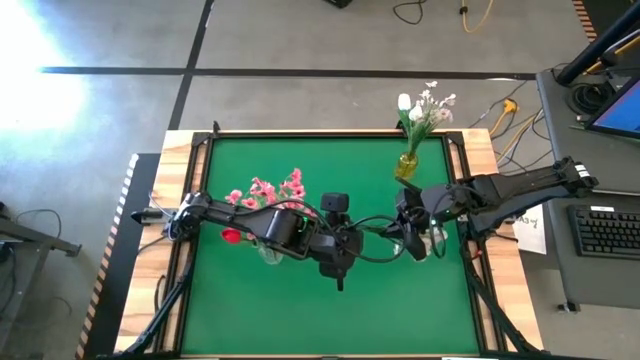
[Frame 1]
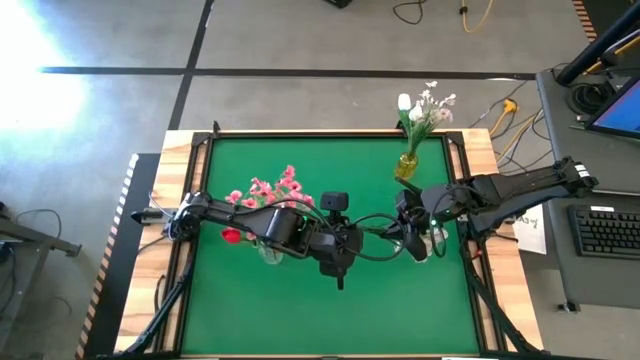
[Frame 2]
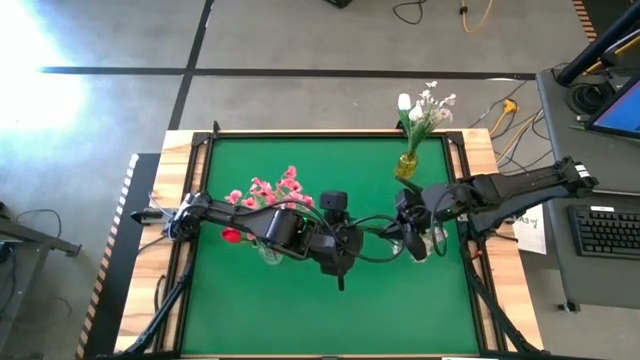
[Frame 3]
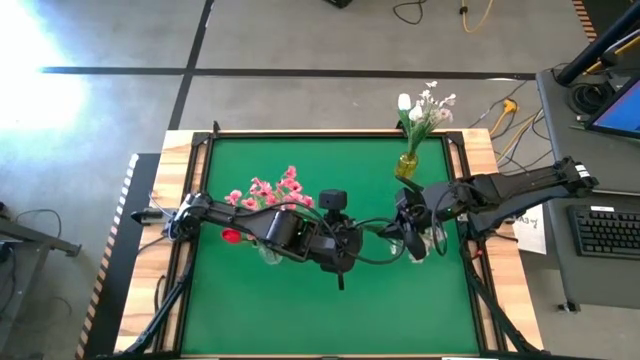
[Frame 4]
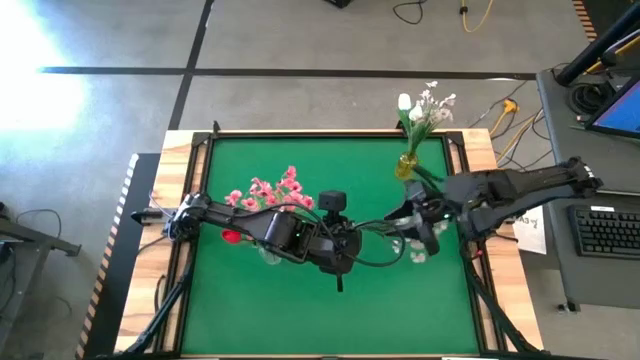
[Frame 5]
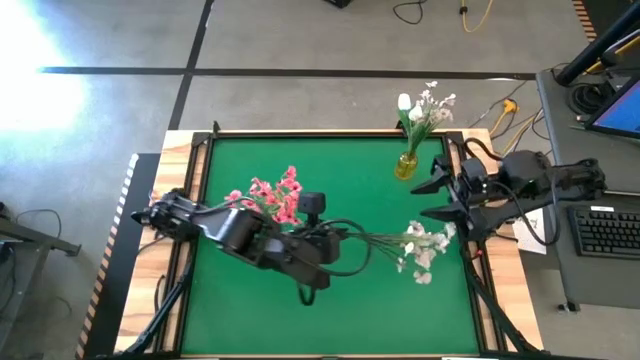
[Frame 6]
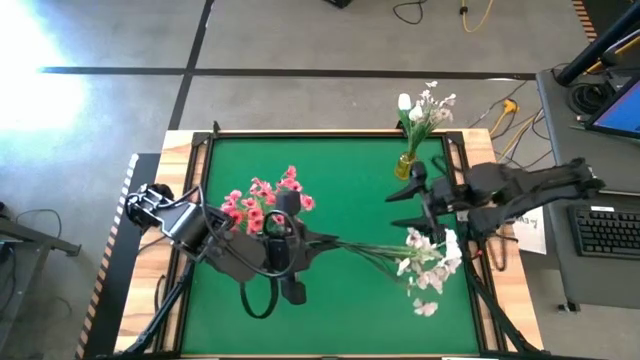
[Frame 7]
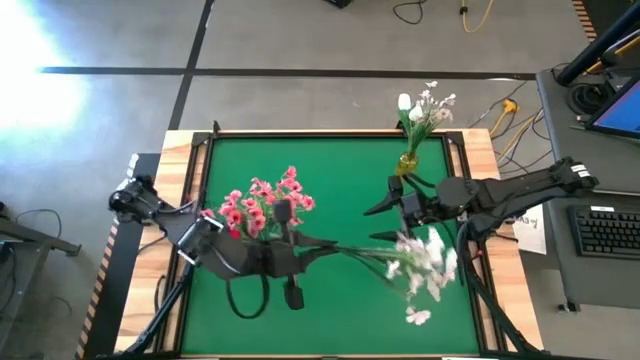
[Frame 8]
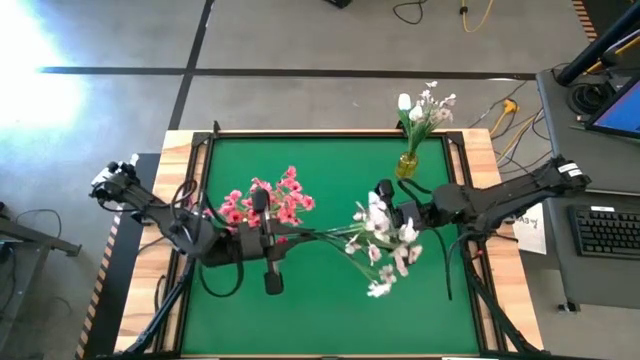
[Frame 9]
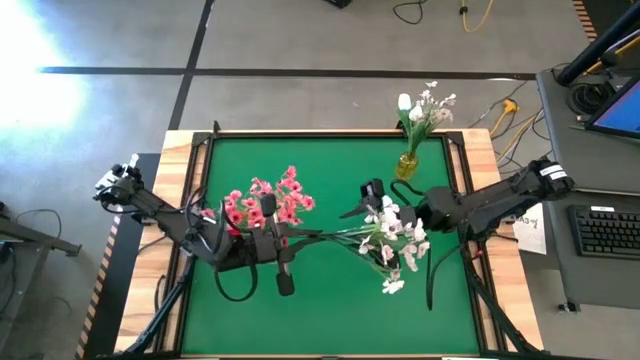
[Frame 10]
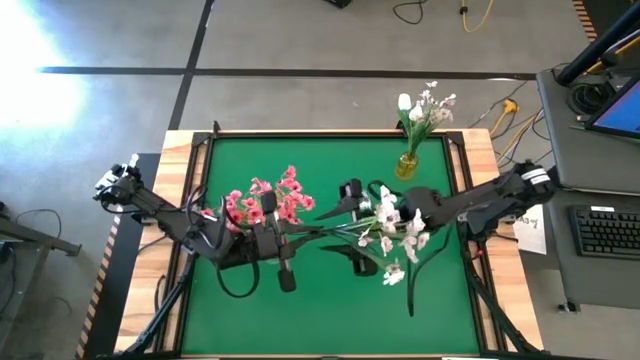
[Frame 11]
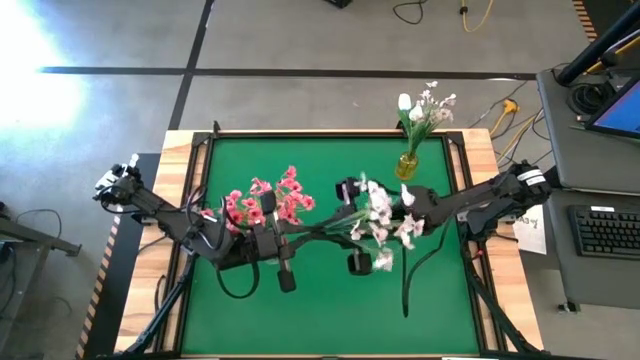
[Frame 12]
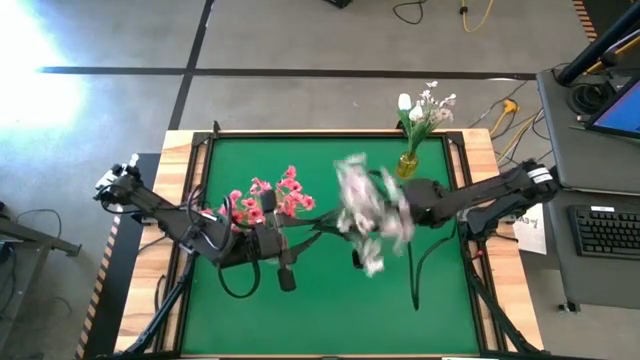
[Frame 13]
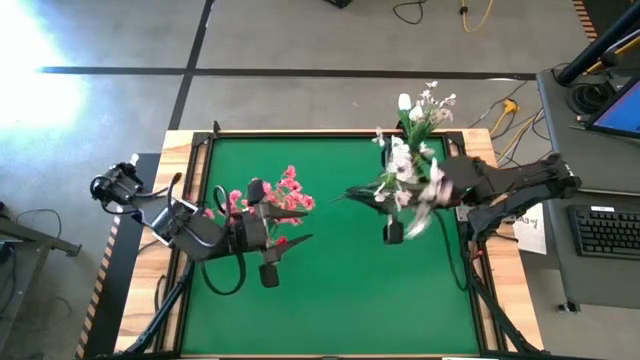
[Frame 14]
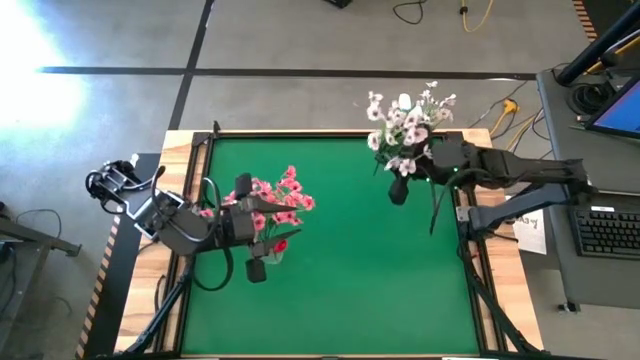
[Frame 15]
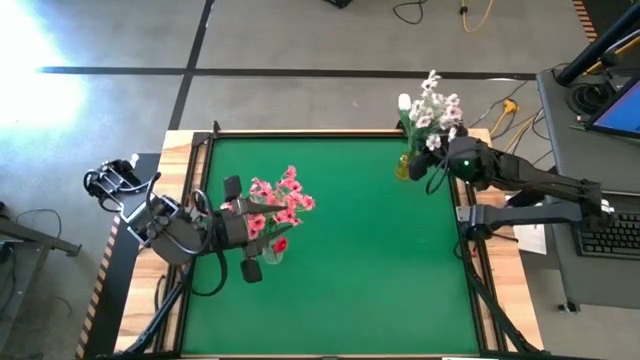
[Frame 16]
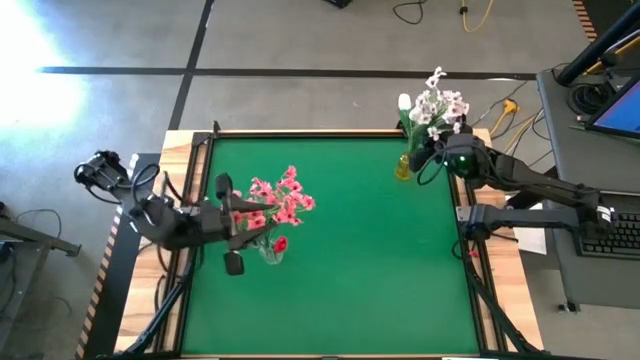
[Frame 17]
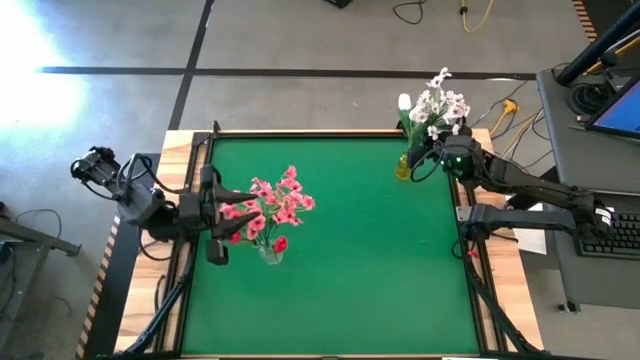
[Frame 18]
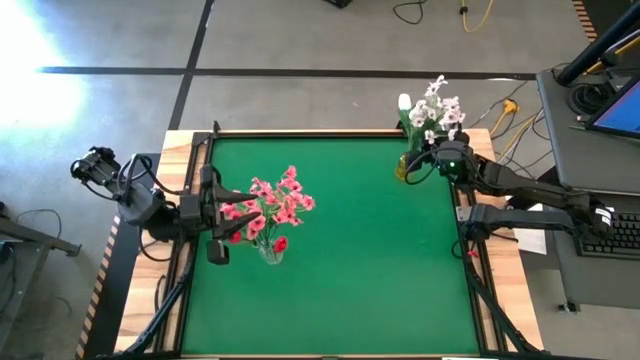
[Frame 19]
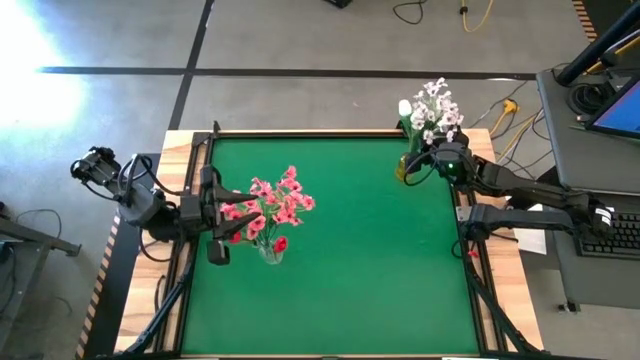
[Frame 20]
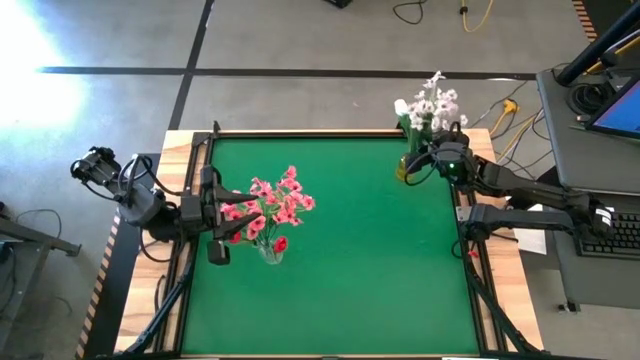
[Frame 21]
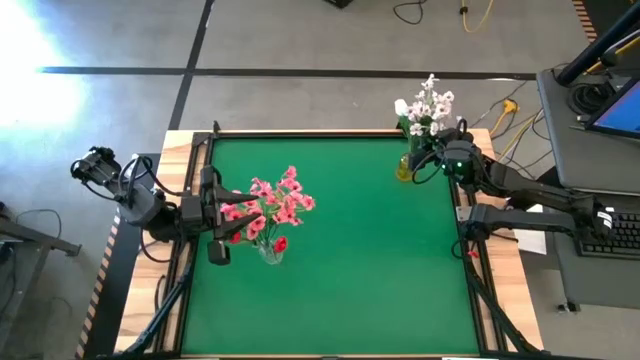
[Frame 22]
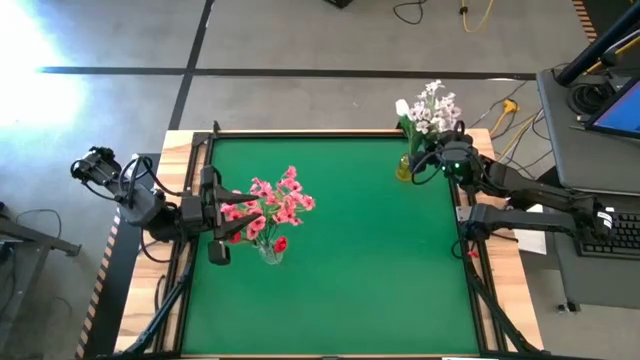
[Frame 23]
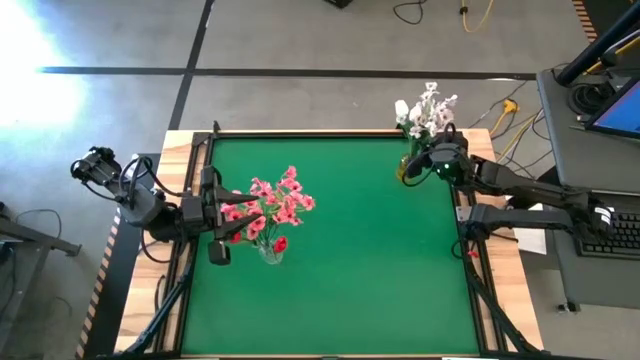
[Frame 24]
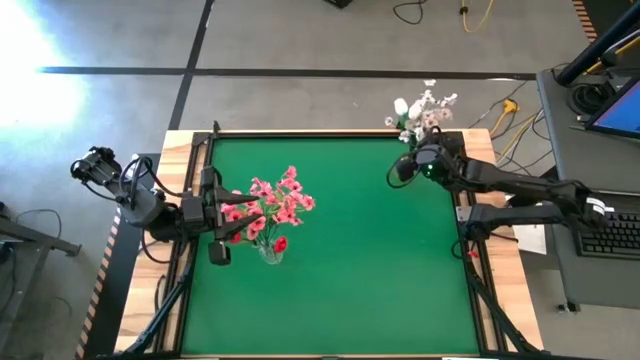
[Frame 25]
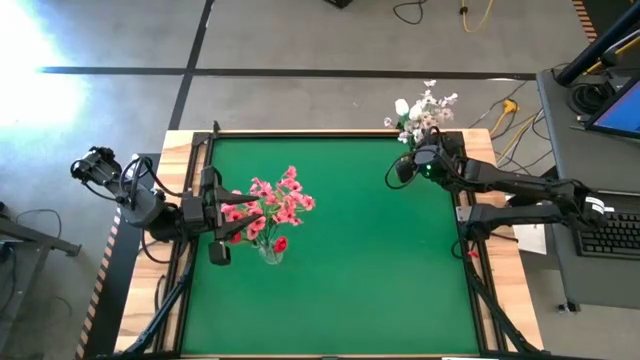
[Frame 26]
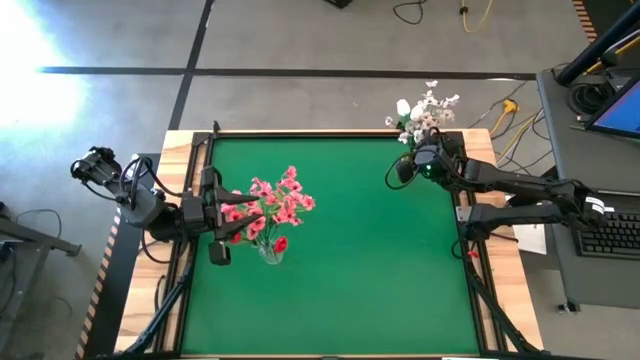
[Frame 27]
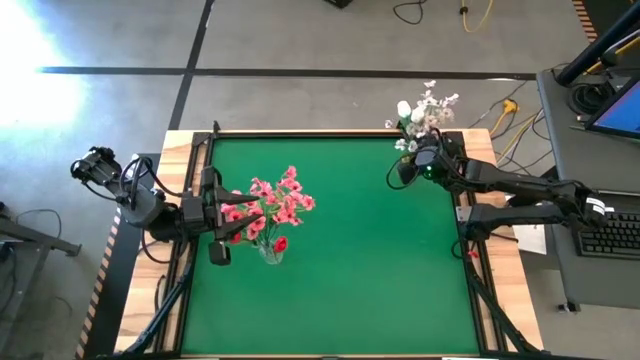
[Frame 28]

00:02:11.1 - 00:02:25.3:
Task: Sort flowers into vase by color
Put the white flower into the transparent vase

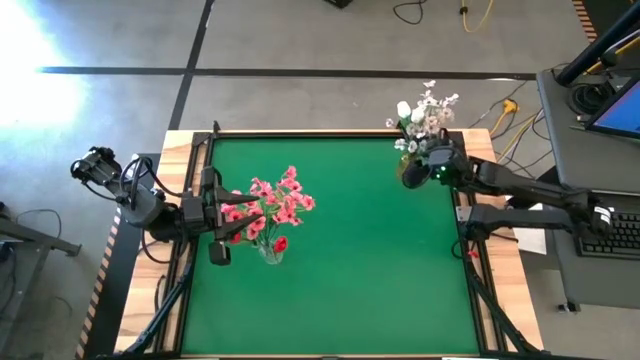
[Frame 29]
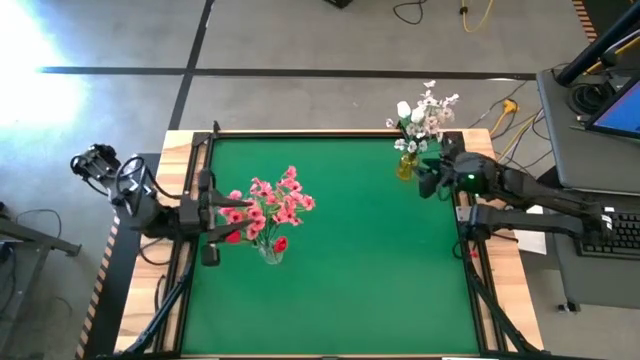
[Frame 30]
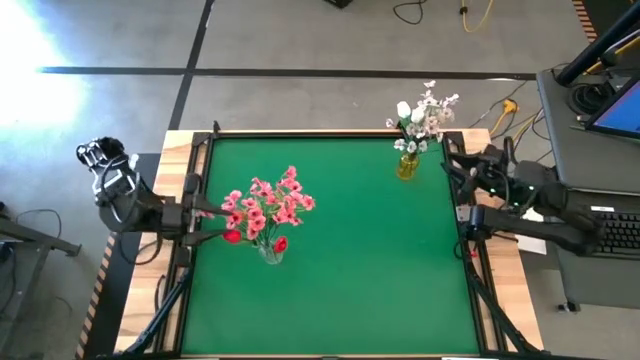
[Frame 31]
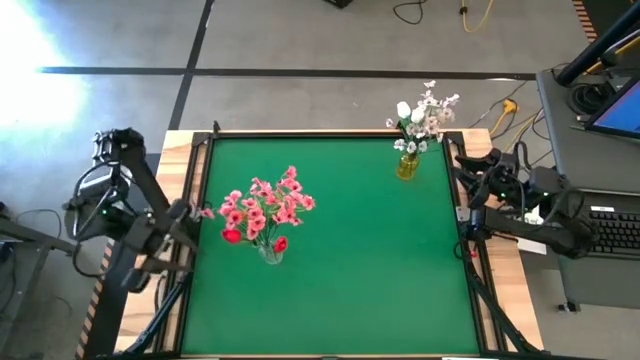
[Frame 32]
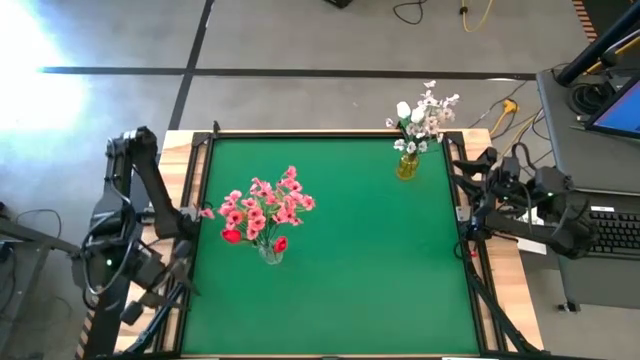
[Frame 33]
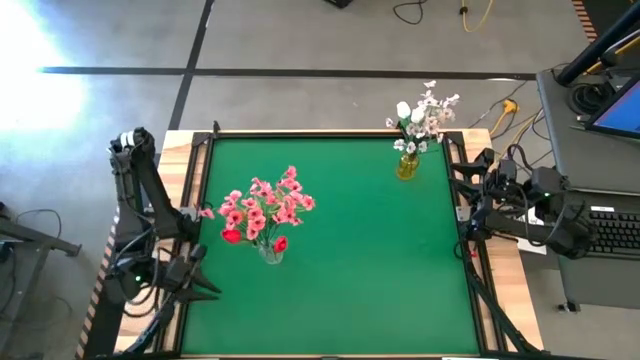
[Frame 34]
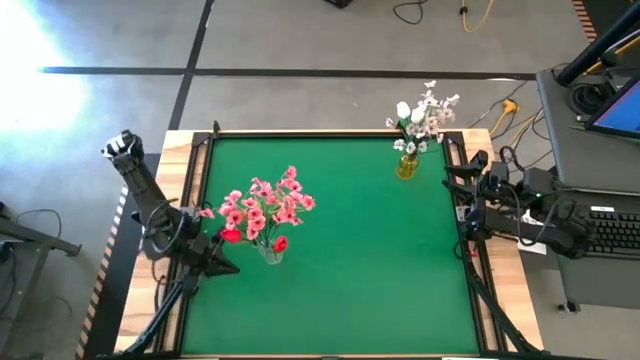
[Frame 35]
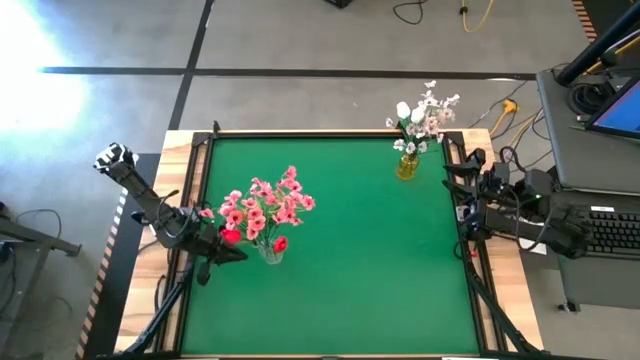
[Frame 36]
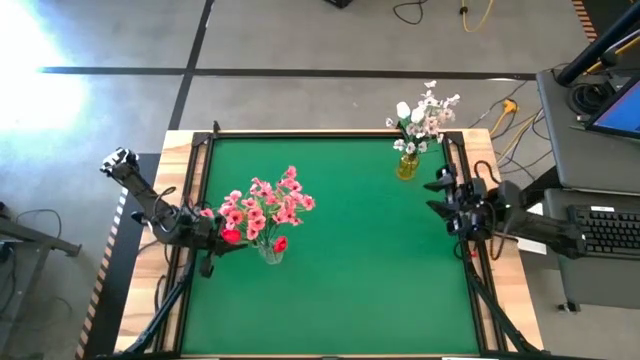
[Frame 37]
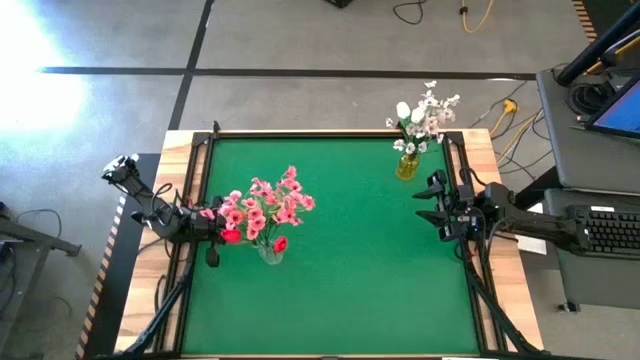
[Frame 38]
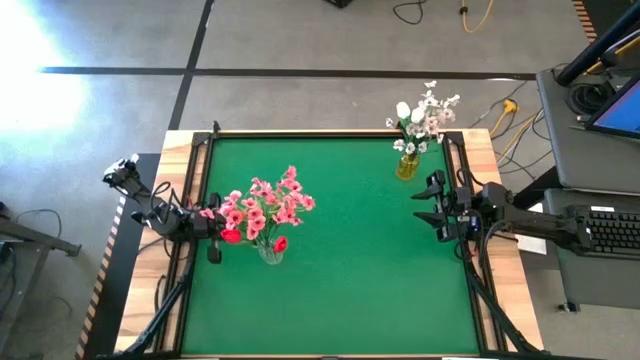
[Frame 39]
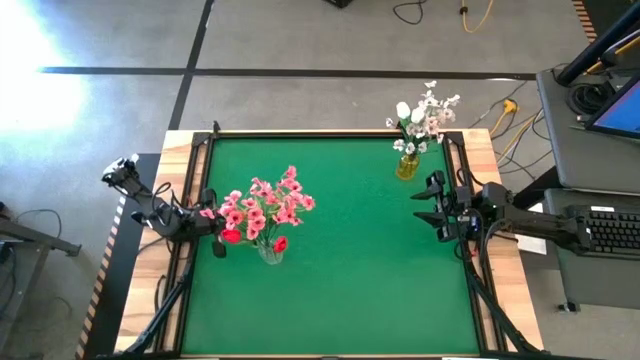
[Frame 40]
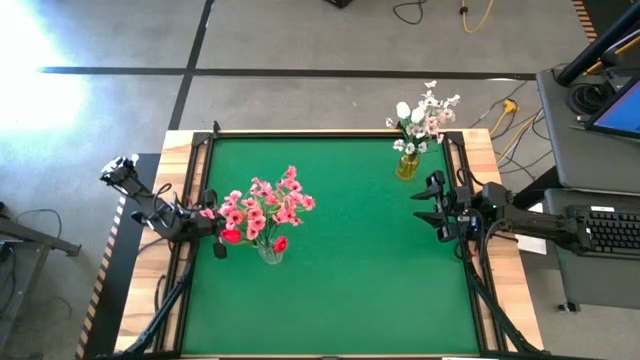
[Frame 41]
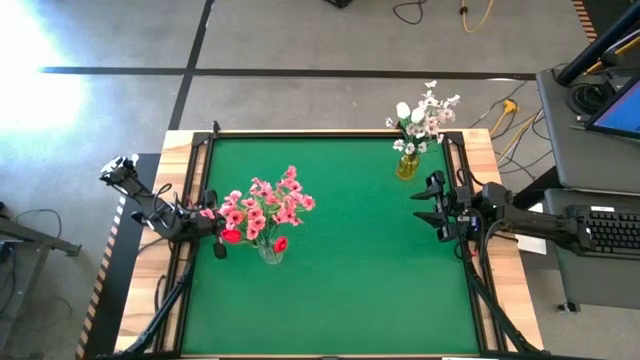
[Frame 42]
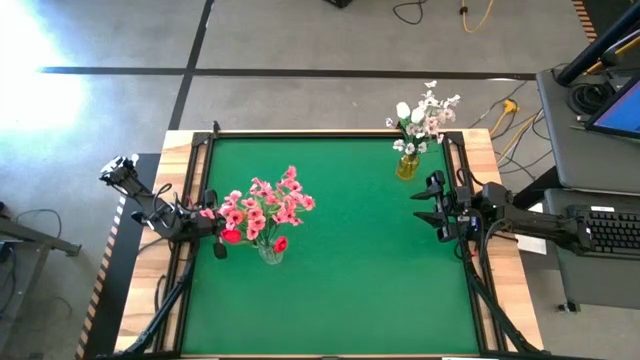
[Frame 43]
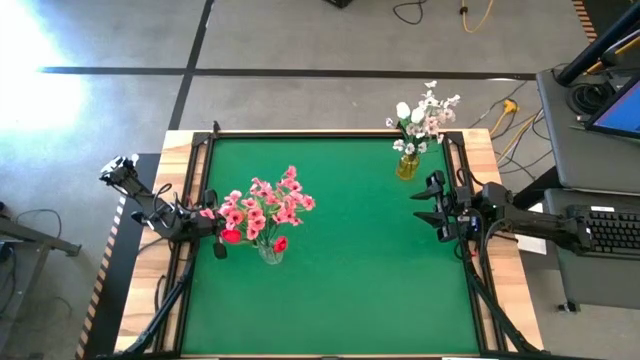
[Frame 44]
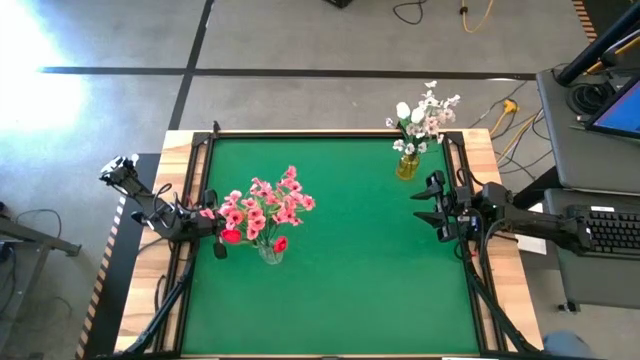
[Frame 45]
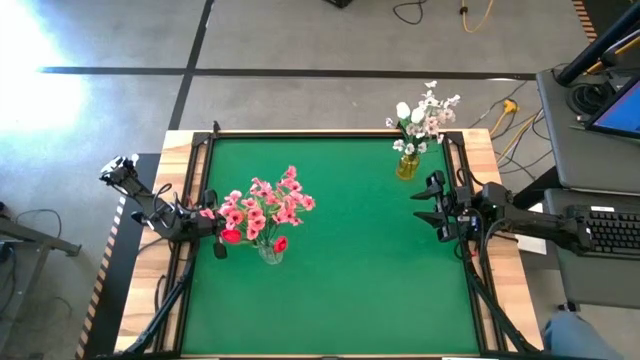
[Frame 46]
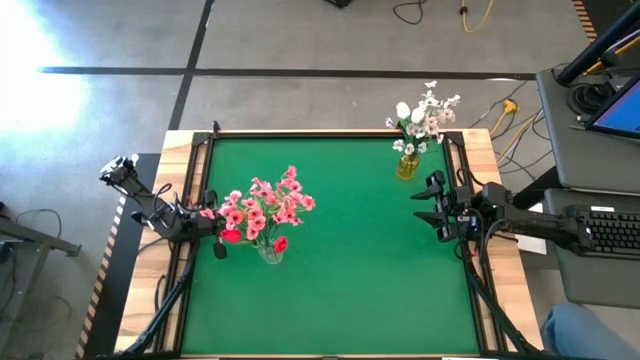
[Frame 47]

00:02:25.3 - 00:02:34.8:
Return to Home Position
